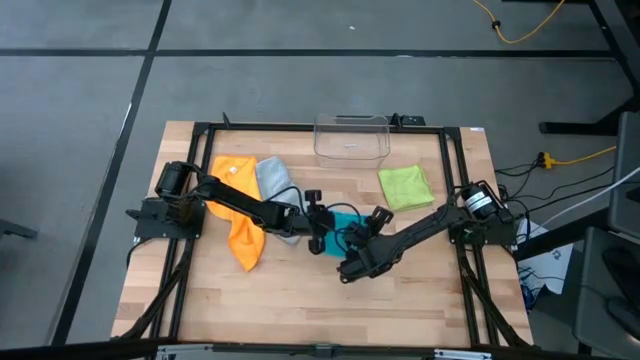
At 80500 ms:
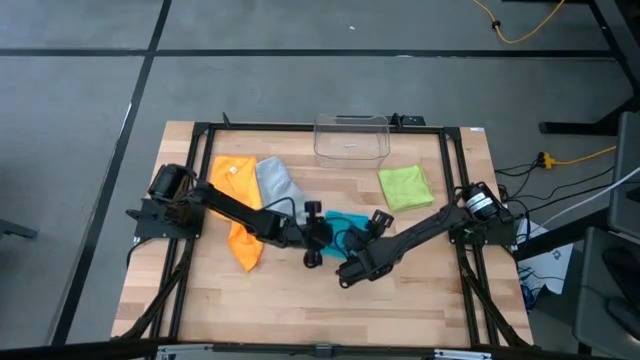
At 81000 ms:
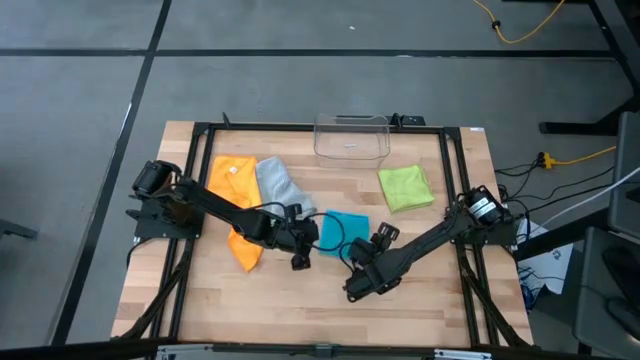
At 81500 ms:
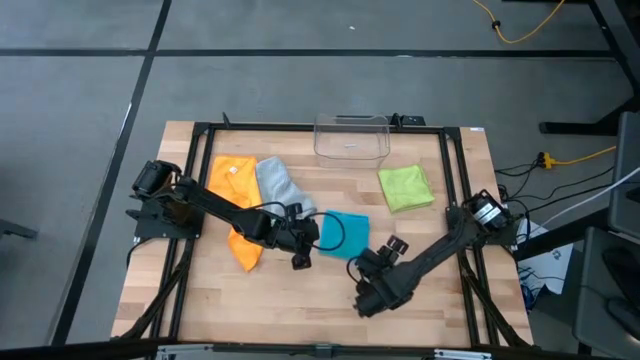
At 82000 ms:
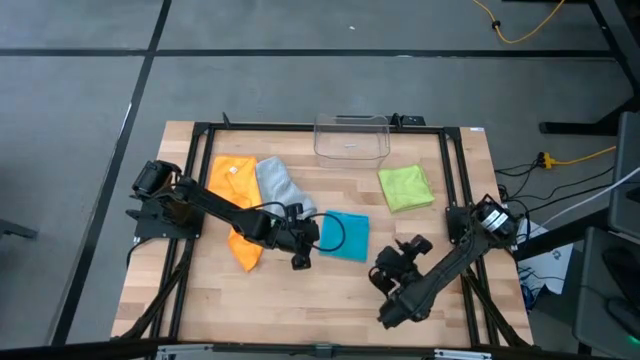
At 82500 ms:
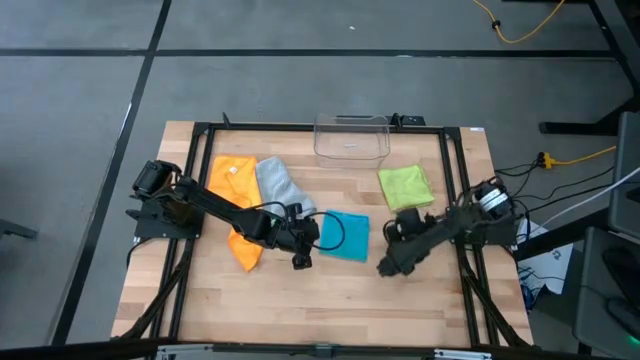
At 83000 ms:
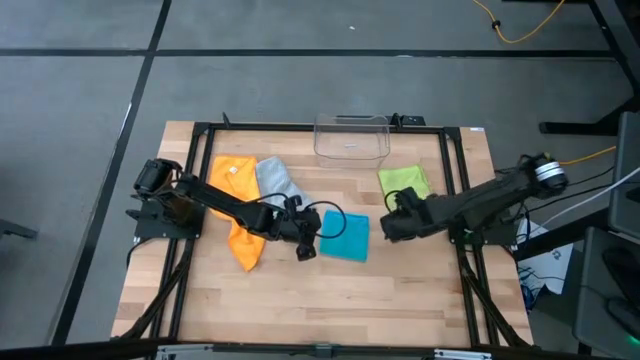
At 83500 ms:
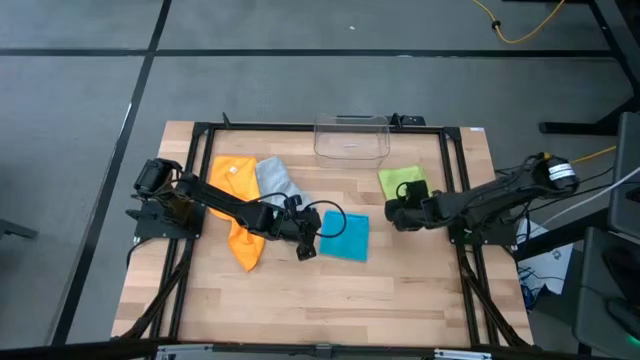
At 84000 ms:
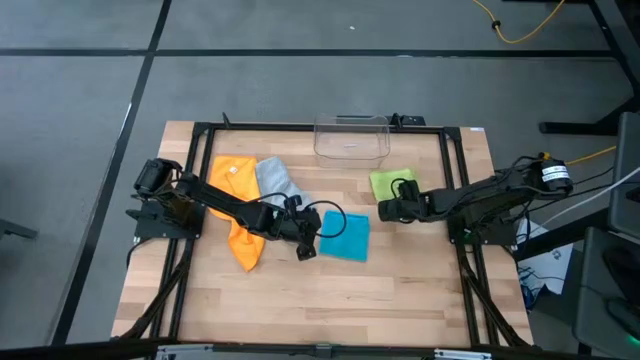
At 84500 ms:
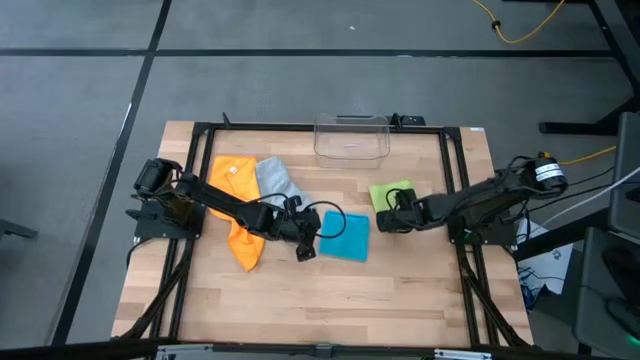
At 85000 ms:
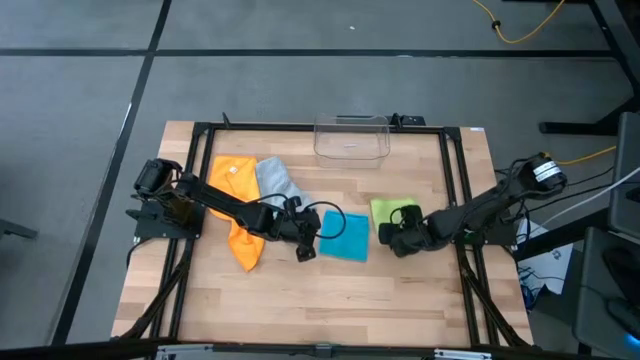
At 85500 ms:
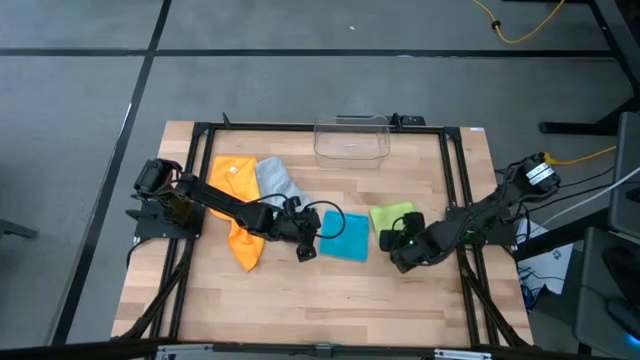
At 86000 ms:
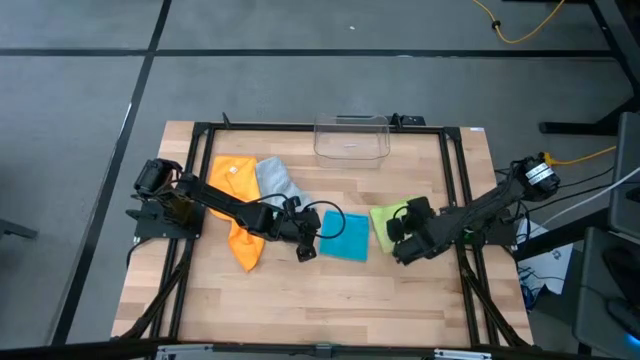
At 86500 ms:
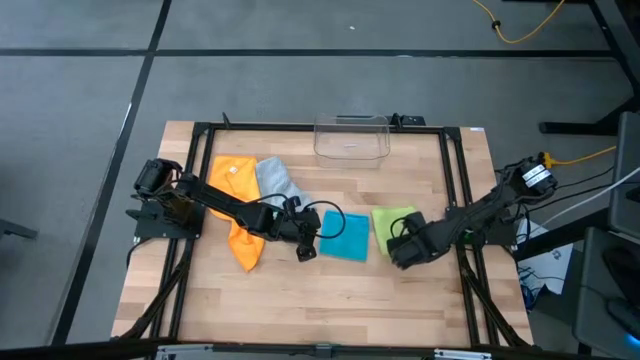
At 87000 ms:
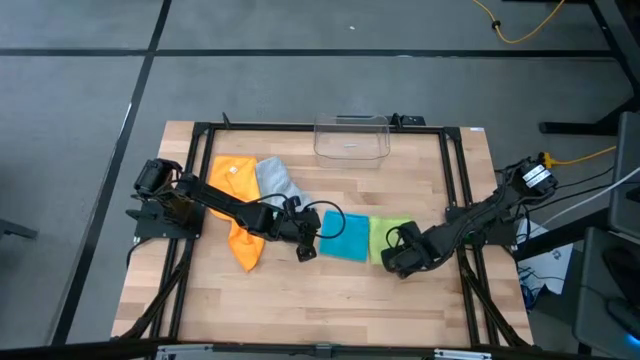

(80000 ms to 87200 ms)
Task: Fold microfiber towels
Adjust the green microfiber towel on the table

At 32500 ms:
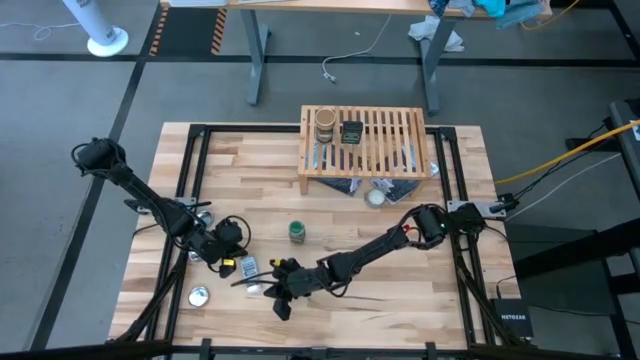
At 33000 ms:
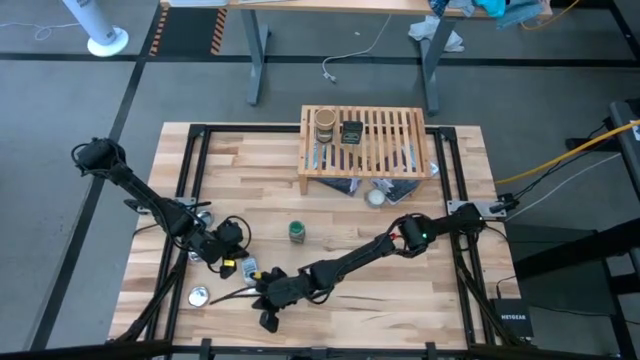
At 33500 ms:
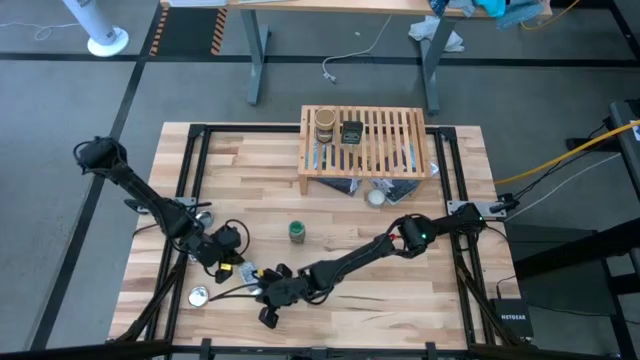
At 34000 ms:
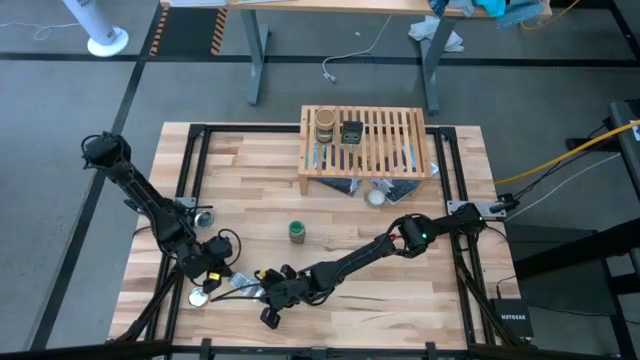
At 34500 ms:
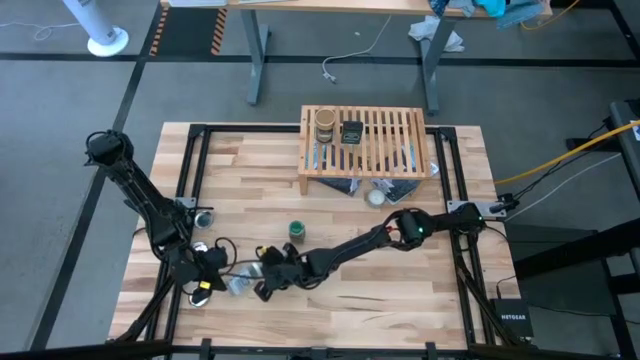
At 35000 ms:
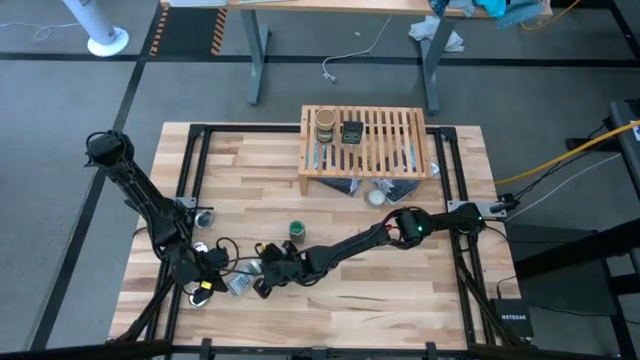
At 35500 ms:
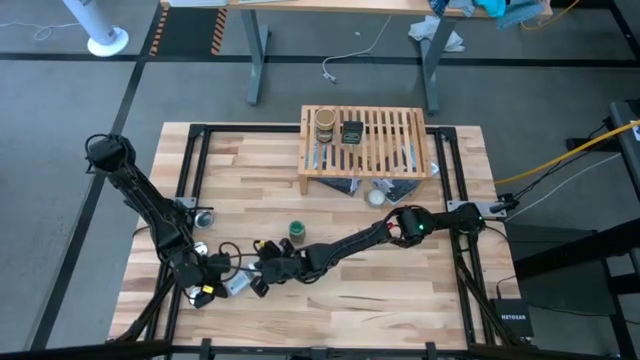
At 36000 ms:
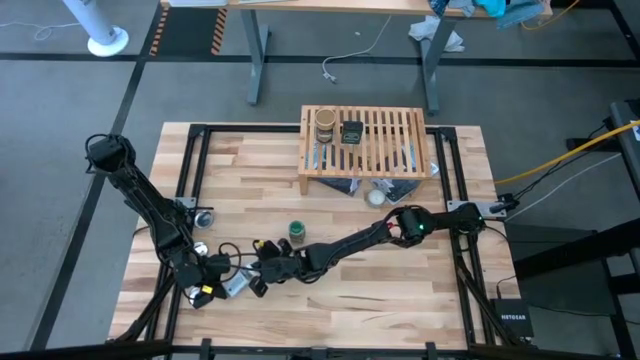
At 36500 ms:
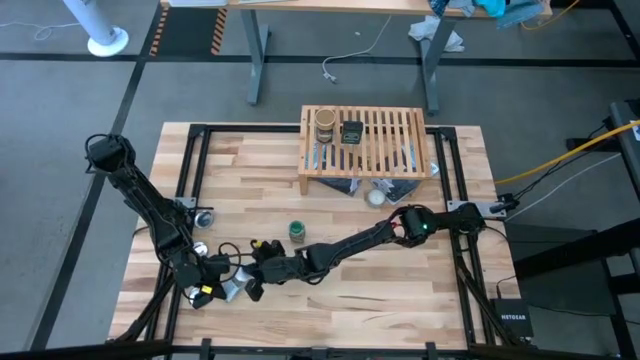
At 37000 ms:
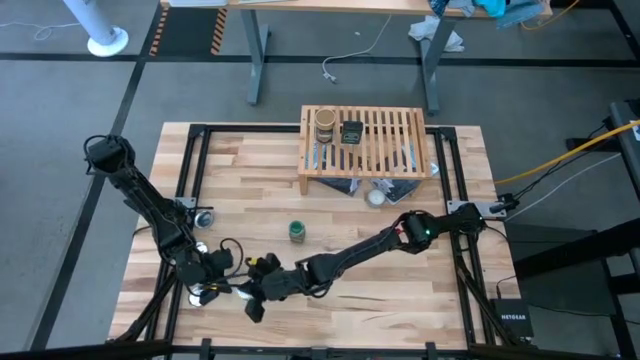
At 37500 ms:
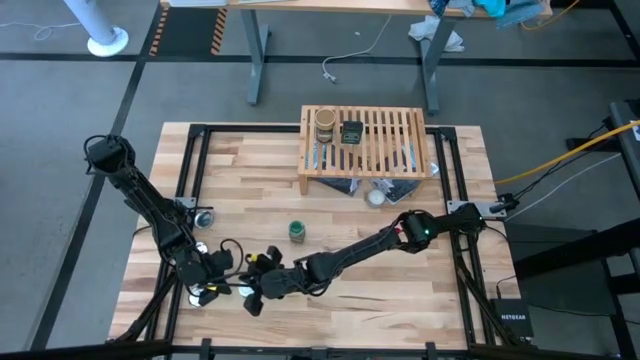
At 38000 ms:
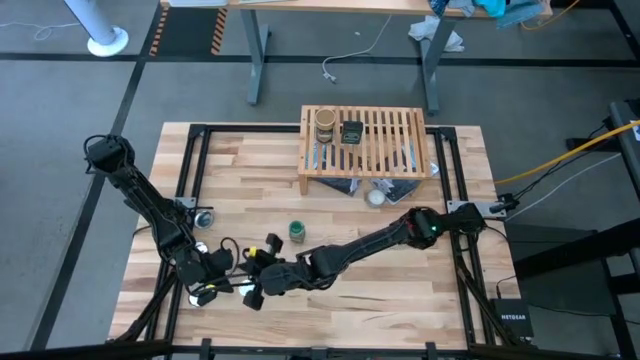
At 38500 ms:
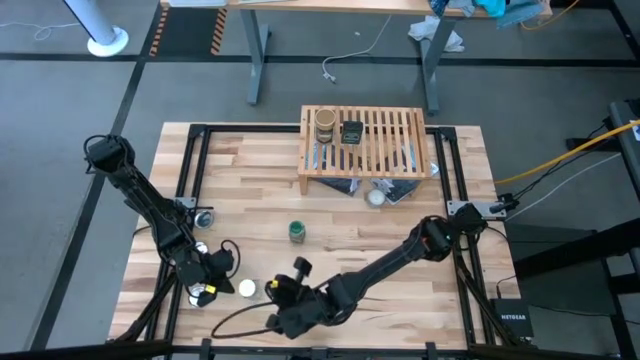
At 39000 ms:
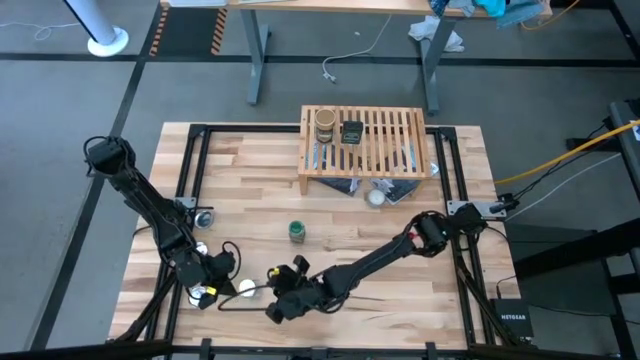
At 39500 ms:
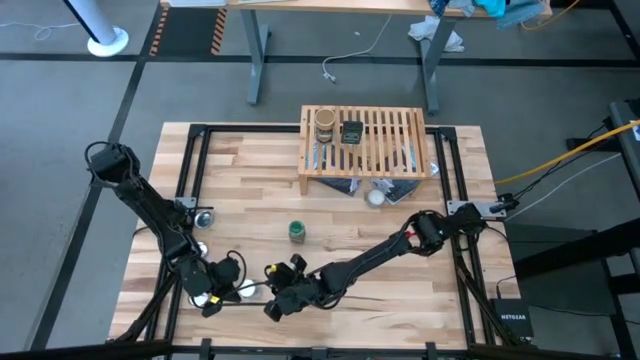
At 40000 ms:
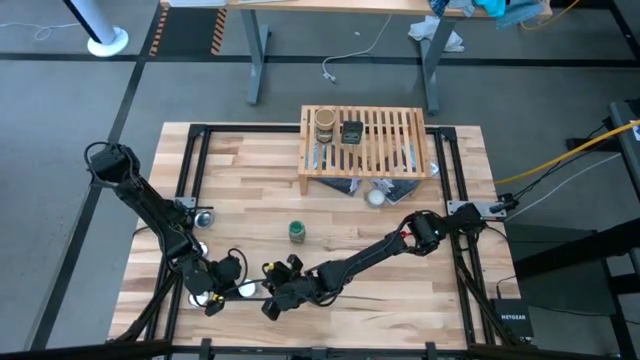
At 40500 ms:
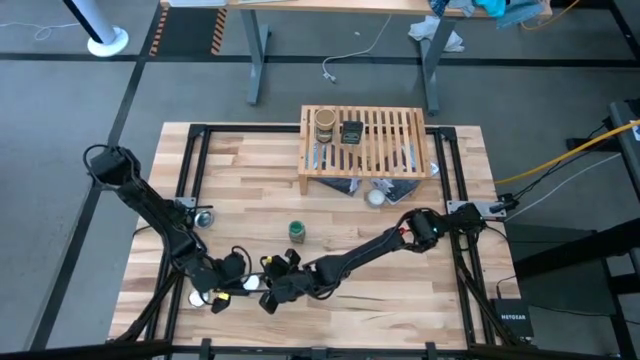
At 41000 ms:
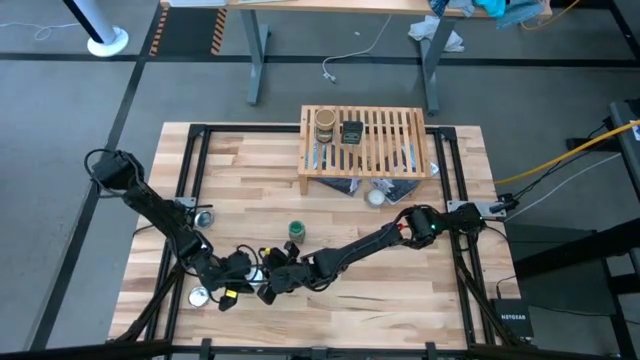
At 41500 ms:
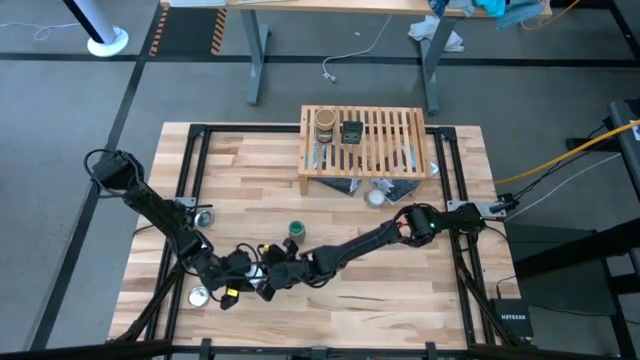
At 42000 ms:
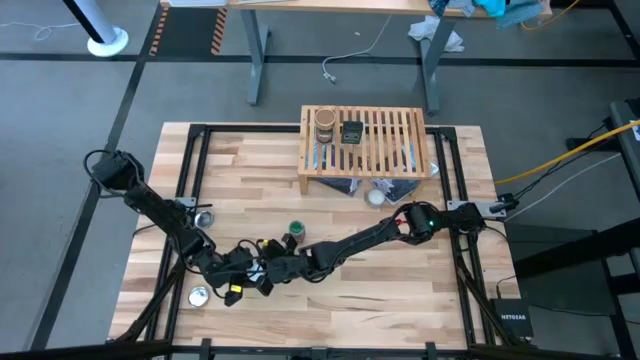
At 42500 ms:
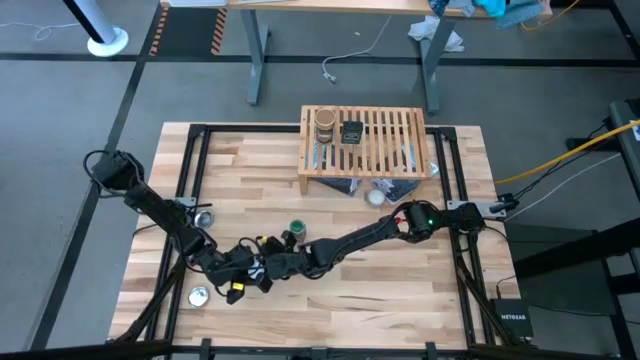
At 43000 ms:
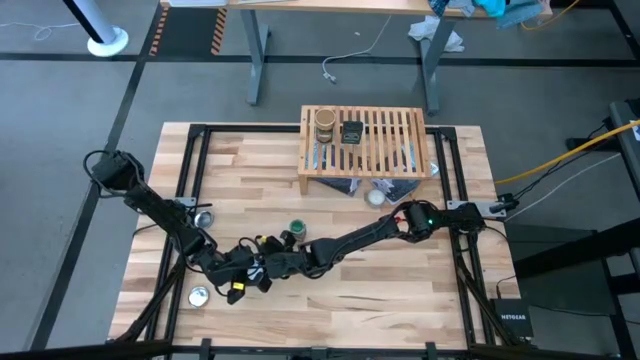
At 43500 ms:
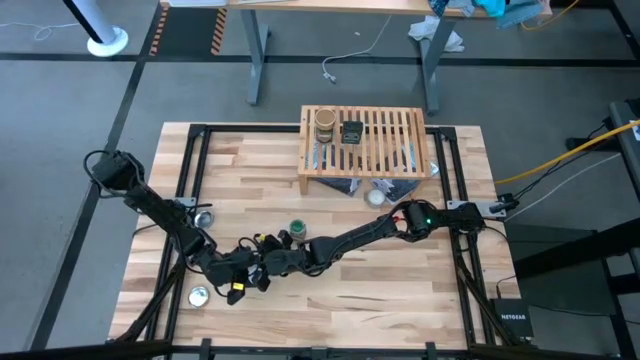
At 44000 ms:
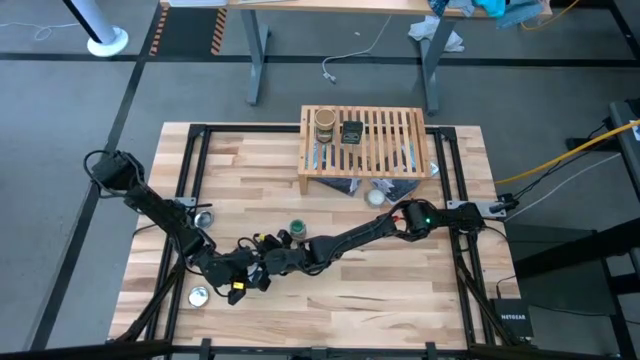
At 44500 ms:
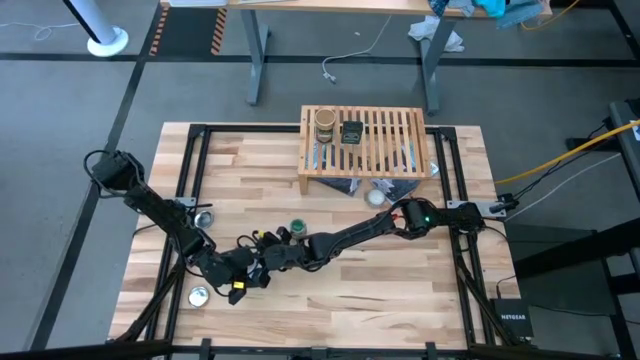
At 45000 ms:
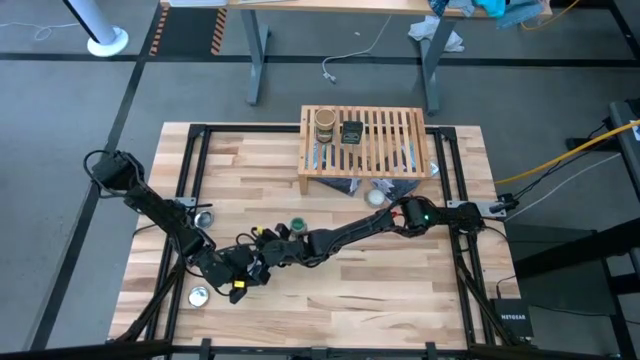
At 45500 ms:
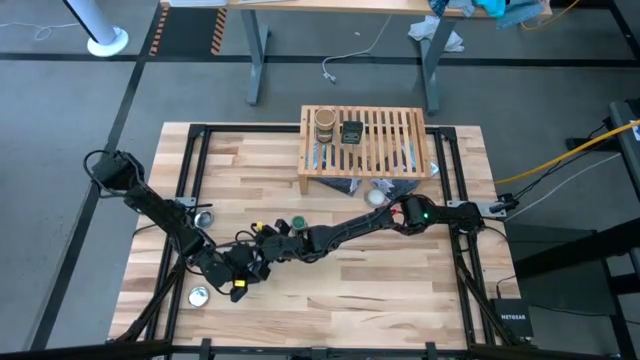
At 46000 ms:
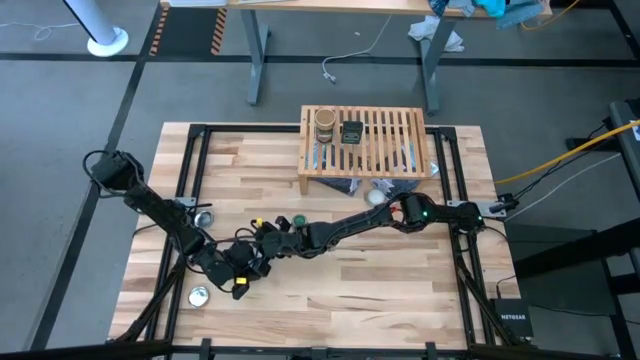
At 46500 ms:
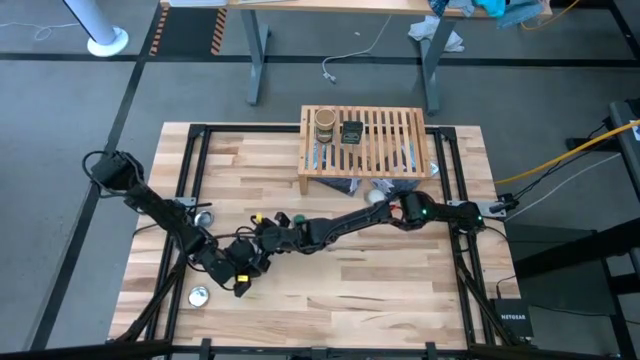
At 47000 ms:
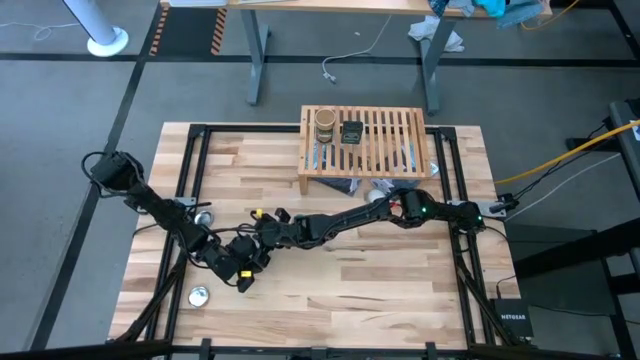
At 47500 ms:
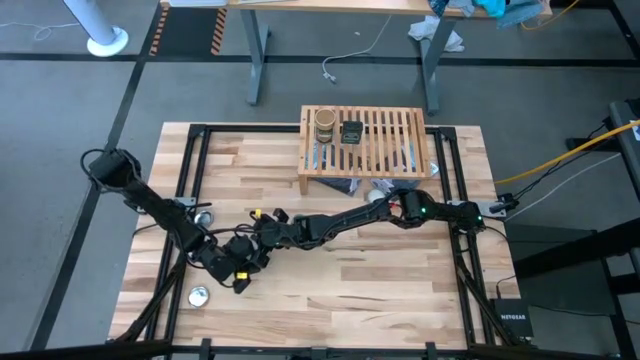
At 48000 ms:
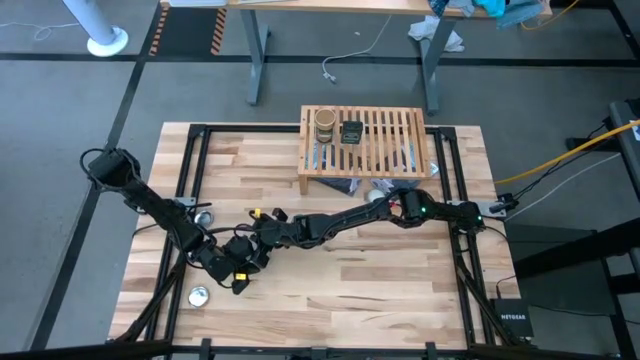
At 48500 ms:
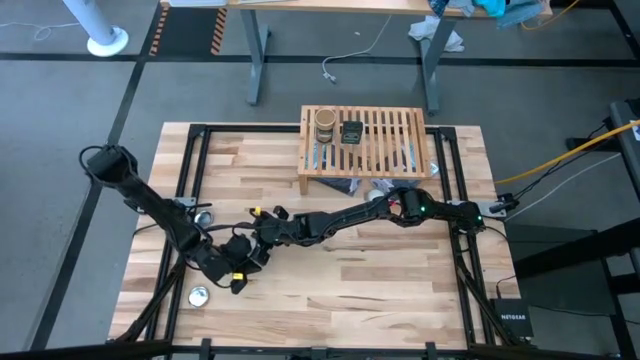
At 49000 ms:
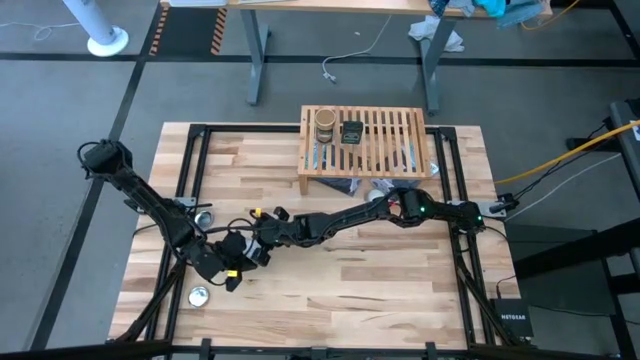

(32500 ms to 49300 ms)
Task: Shelf spices
Move the white seasoning bottle to the middle left of the table
